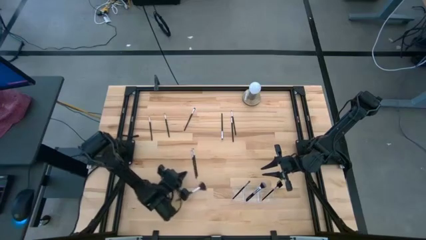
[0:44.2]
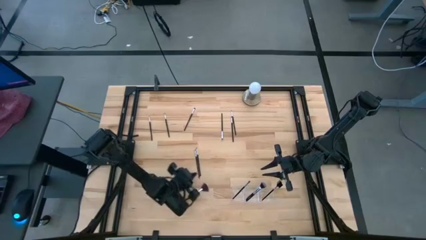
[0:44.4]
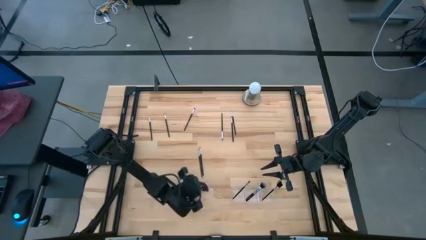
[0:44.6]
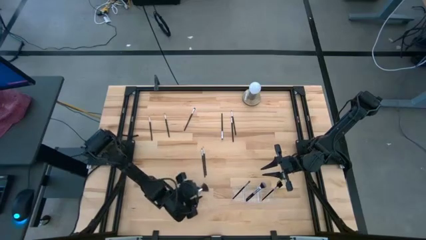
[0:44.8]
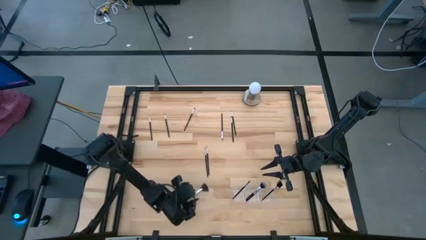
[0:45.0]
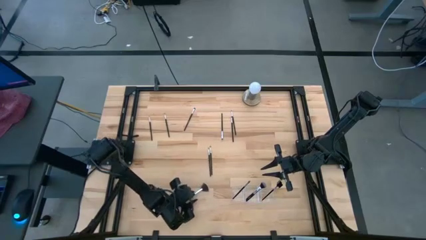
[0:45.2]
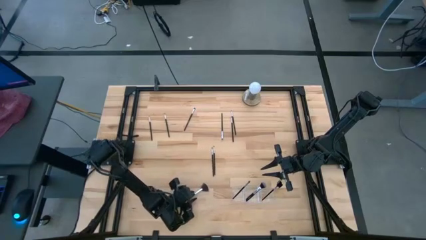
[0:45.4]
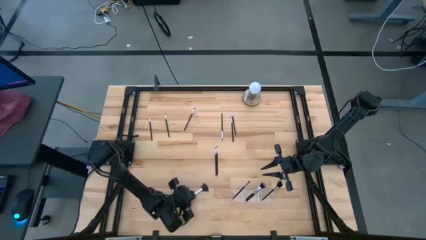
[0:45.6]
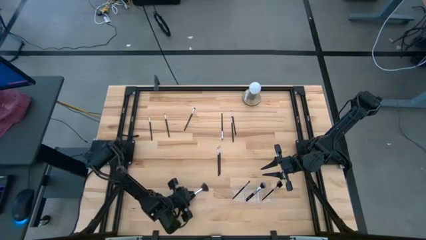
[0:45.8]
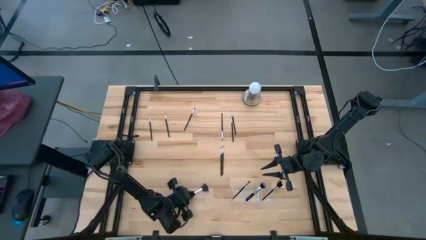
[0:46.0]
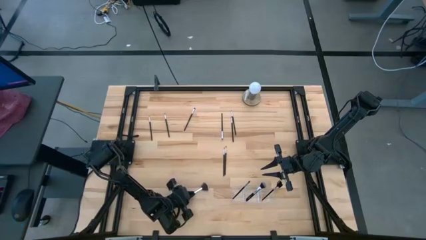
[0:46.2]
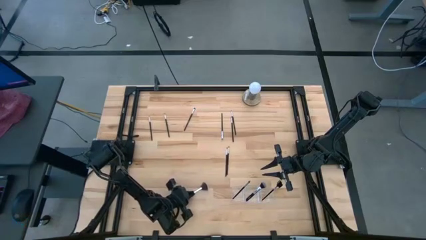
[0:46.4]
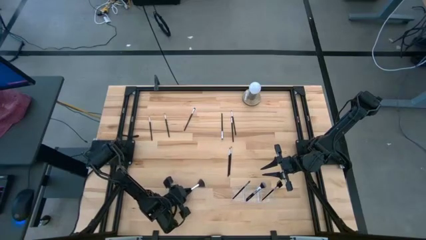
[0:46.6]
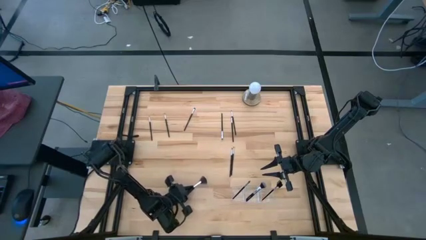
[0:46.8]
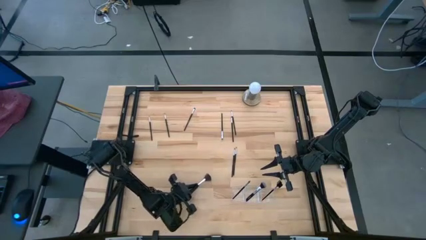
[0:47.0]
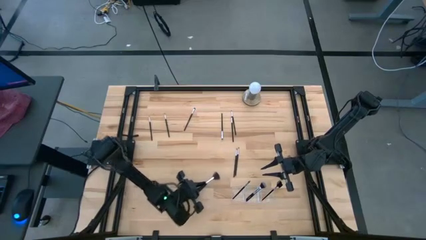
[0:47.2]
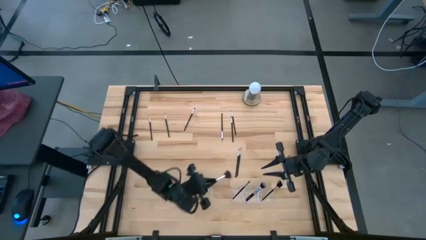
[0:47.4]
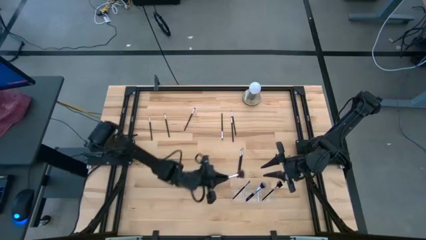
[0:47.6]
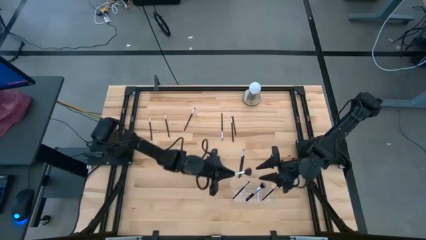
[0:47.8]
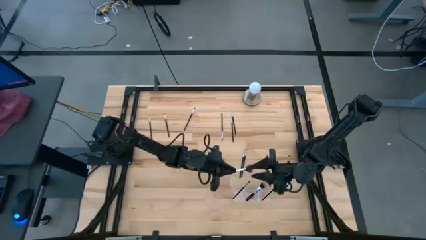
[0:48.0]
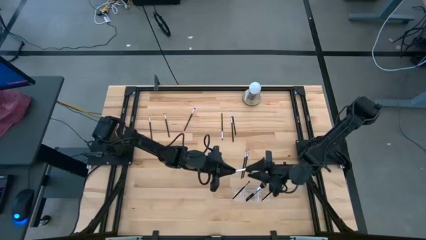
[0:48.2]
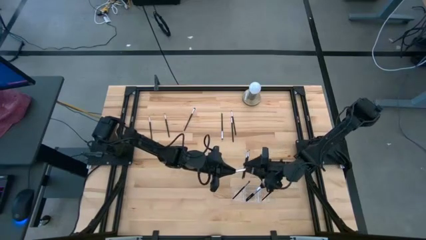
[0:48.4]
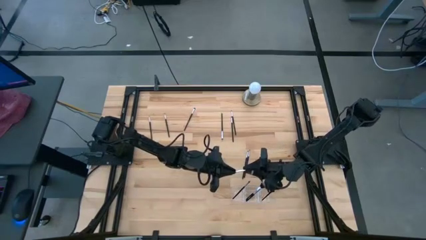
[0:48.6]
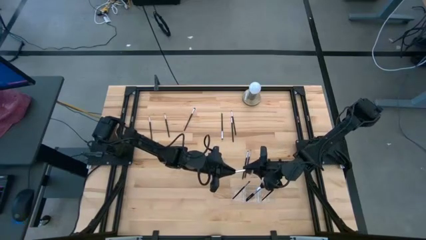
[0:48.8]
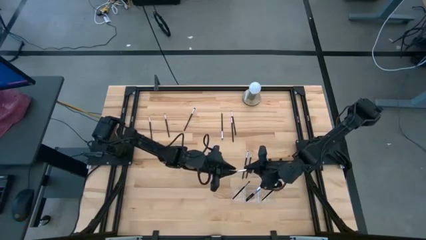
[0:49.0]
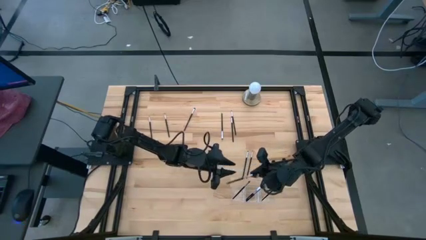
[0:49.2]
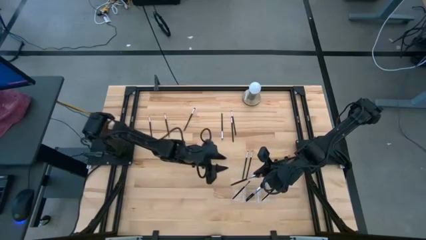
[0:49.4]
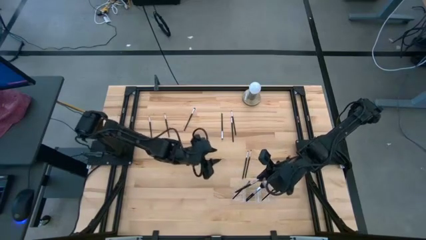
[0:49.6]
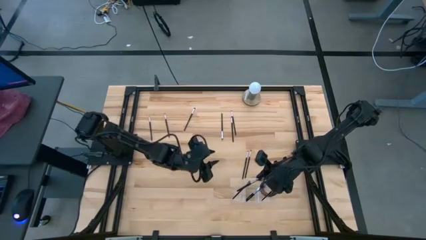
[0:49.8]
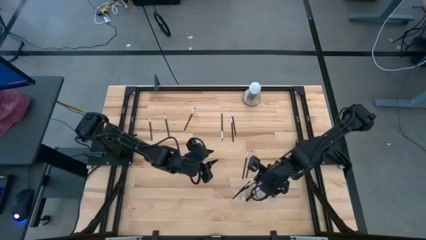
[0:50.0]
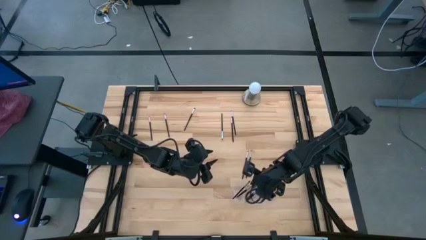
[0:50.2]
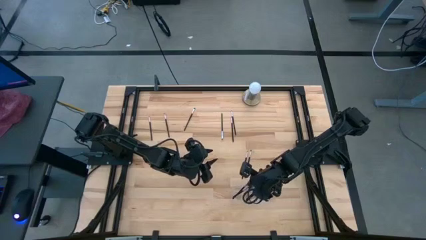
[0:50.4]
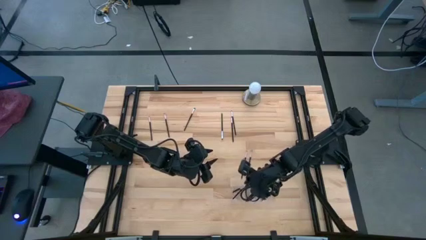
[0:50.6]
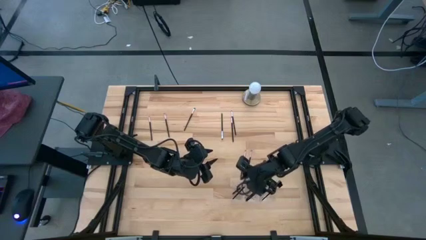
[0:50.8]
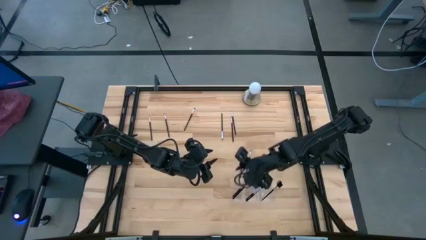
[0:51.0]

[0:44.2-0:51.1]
Task: Put items in baskets/containers
Put the highlighter brush into the left section of the transparent organizer

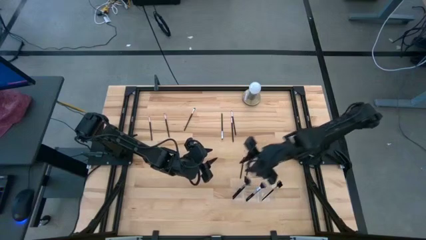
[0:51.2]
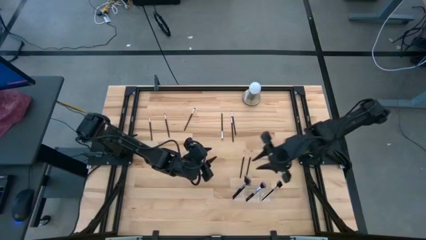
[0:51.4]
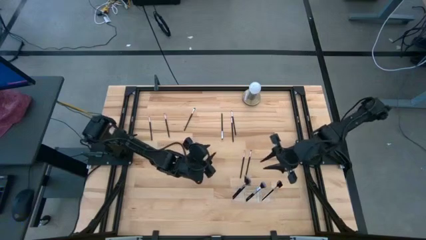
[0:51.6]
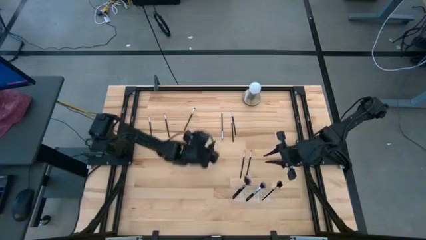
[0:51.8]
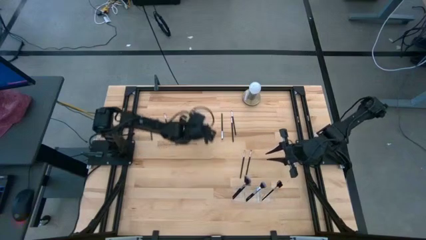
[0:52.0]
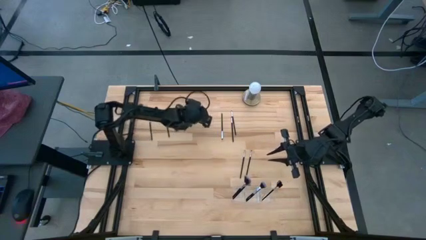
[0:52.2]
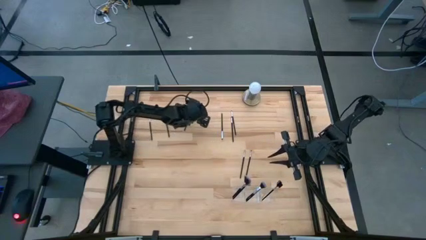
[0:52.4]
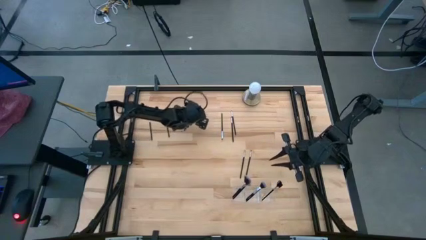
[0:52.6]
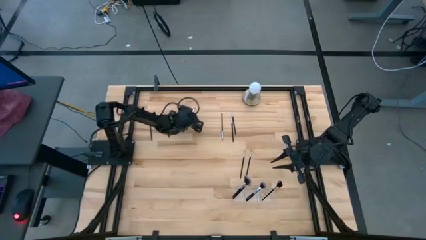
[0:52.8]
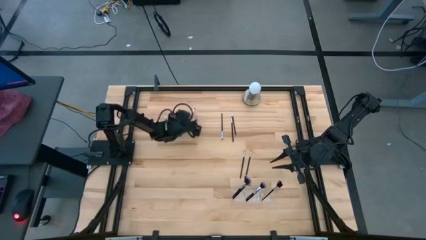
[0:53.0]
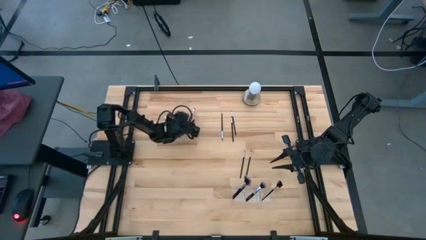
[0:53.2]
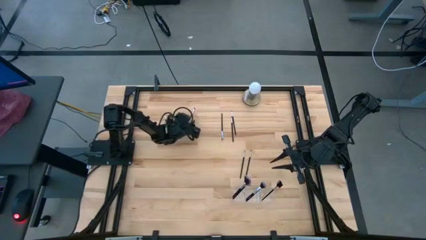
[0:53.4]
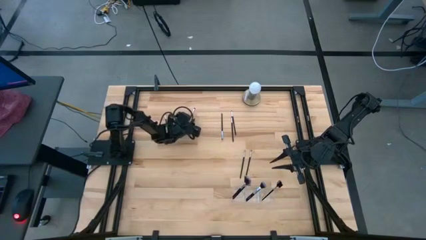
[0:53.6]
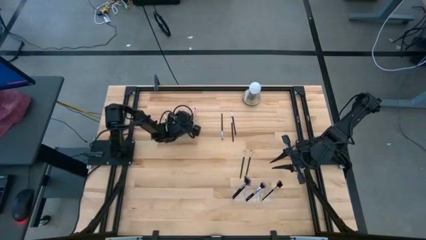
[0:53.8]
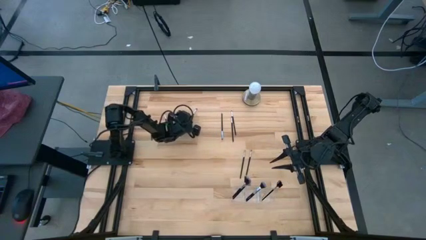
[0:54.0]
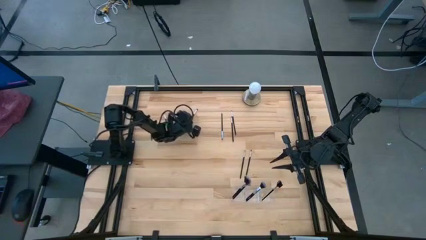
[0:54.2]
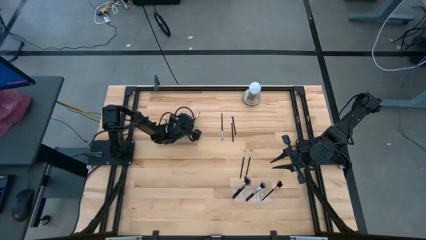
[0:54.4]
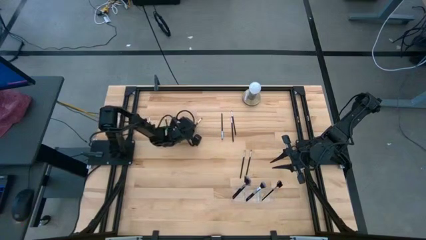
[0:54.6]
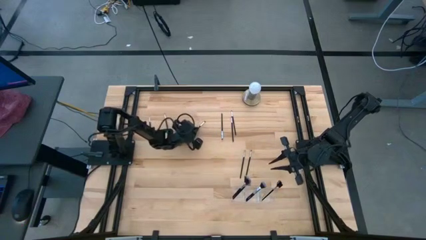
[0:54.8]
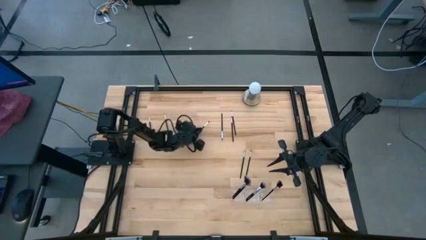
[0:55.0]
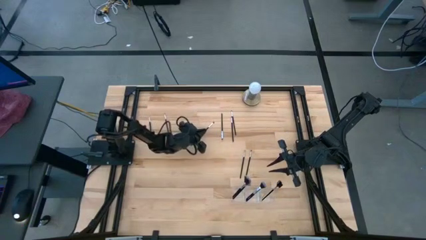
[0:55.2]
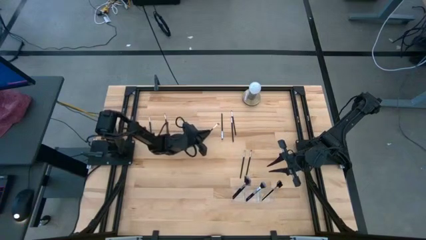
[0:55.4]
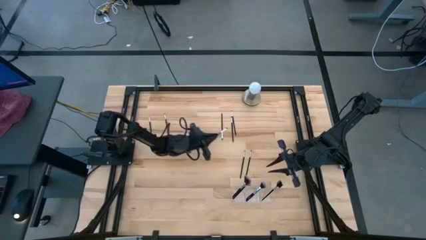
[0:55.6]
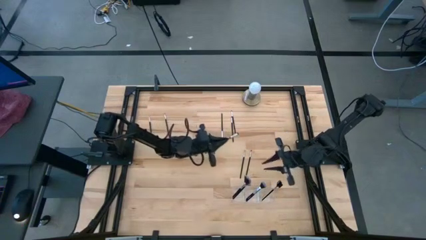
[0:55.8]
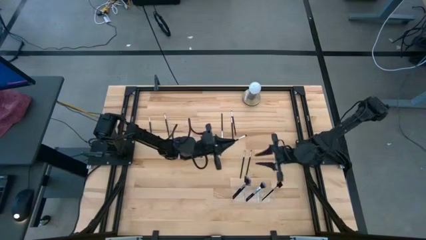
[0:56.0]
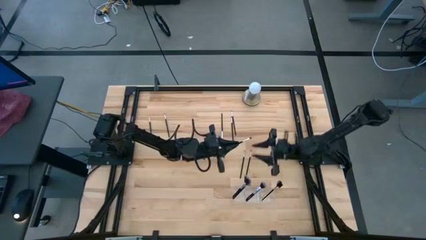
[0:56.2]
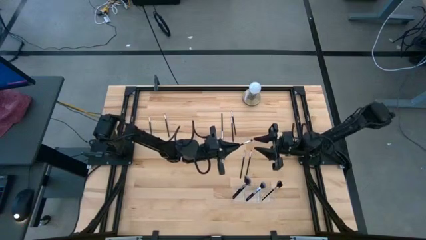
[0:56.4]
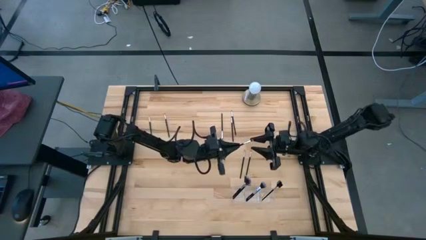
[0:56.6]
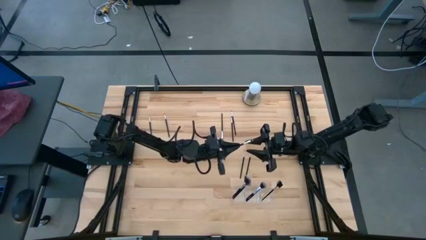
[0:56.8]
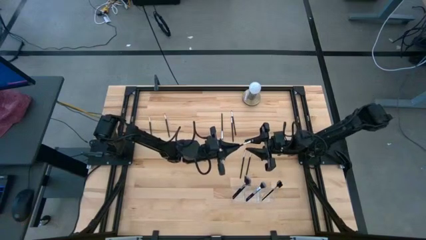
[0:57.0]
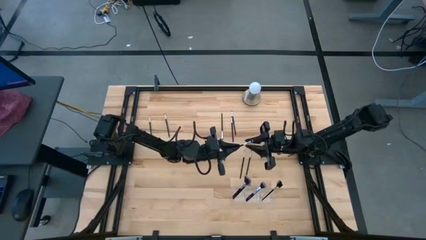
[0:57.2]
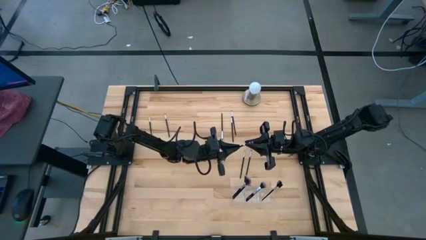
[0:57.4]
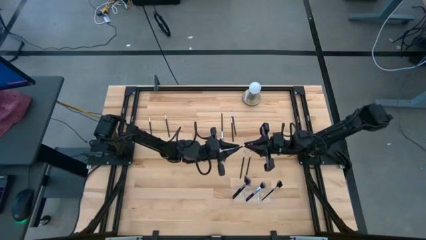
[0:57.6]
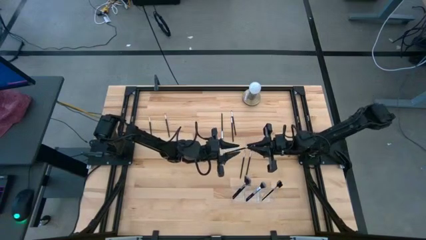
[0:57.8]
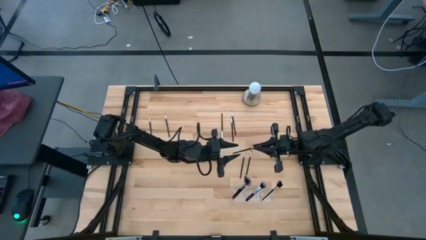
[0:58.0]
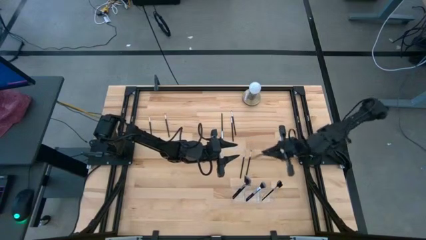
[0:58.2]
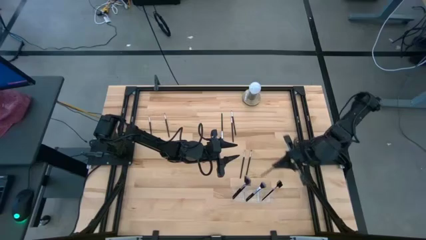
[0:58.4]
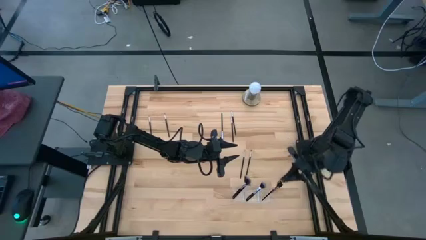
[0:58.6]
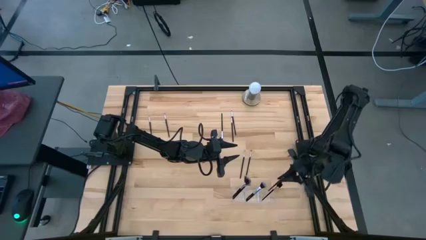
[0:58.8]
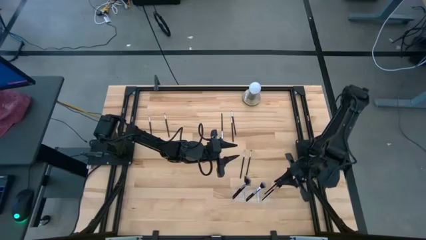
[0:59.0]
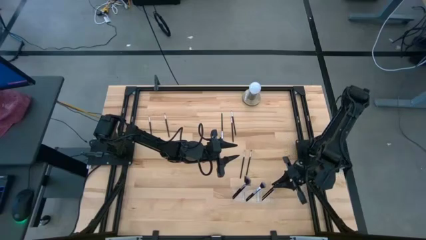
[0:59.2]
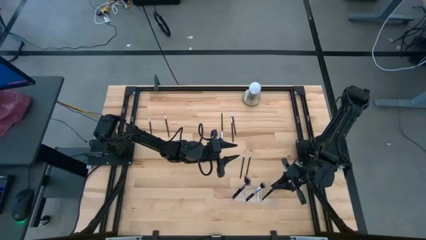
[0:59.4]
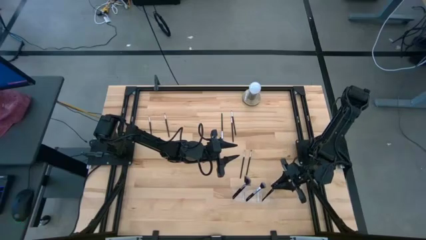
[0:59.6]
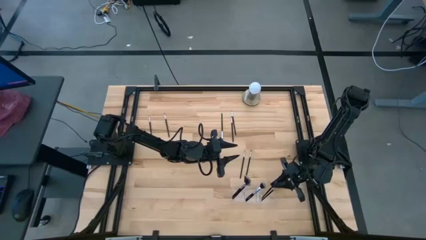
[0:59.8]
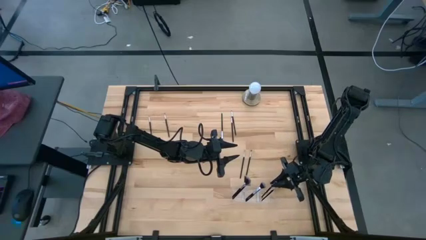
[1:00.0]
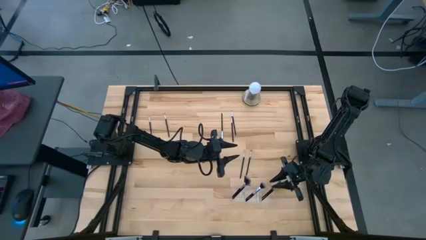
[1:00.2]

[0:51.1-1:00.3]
Put the eyeshadow brush into the right section of the transparent organizer

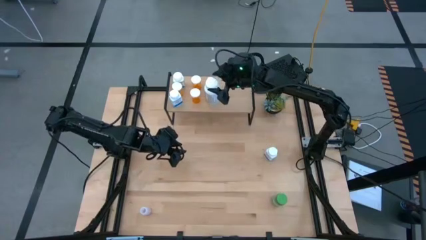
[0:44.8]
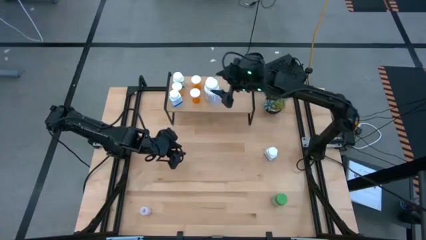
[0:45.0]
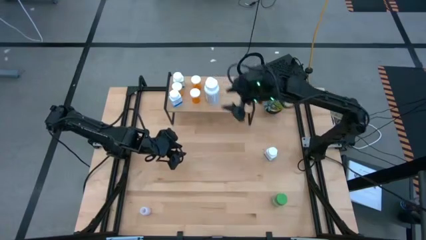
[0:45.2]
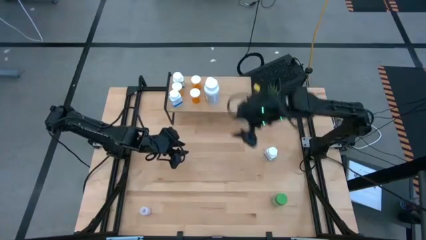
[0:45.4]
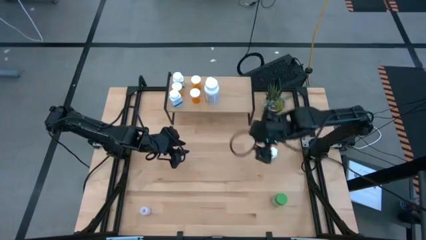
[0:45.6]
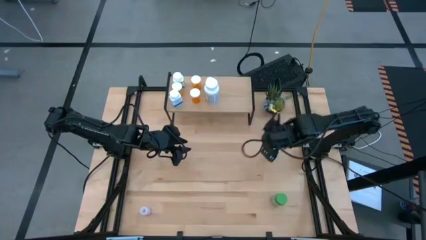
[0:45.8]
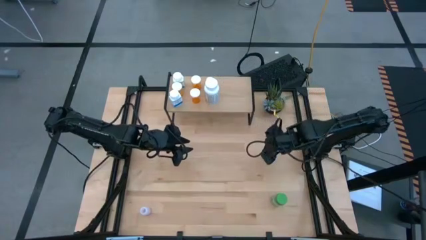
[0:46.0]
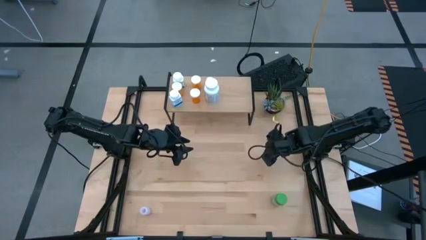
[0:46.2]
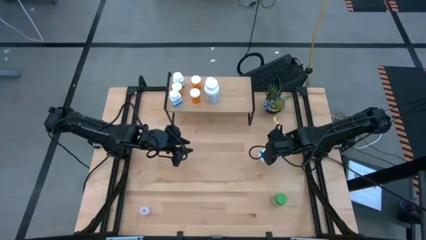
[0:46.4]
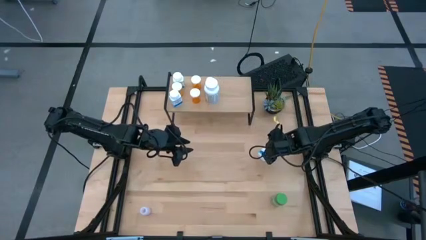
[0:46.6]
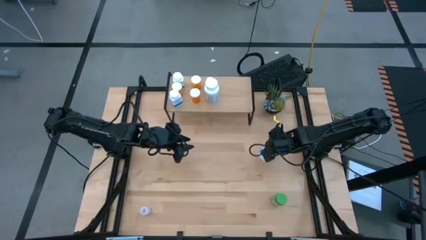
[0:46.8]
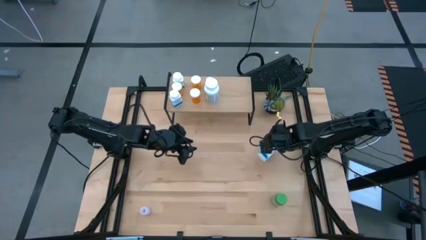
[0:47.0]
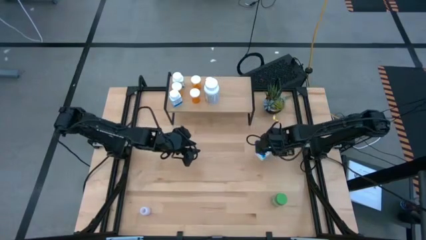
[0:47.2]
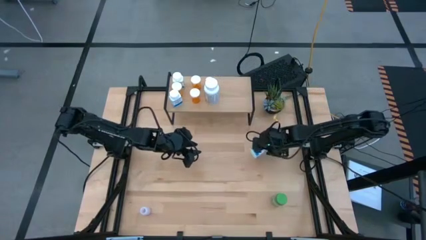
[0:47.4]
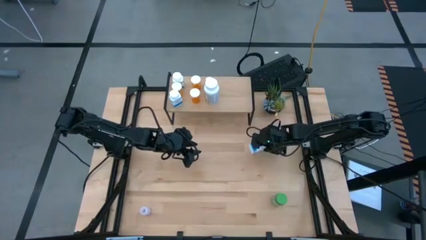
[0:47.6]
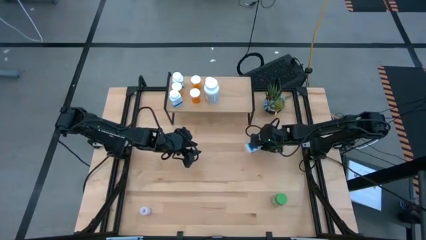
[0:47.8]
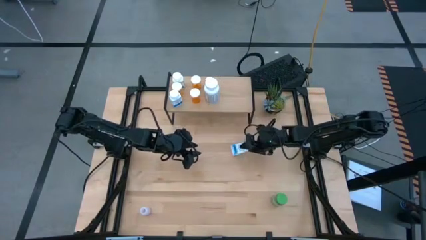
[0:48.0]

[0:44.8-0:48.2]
Task: Pick and place medicine bottles onto shelf by color
Put the blue pill bottle on the shelf
